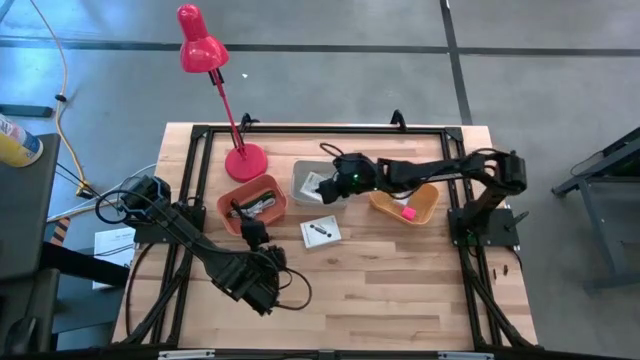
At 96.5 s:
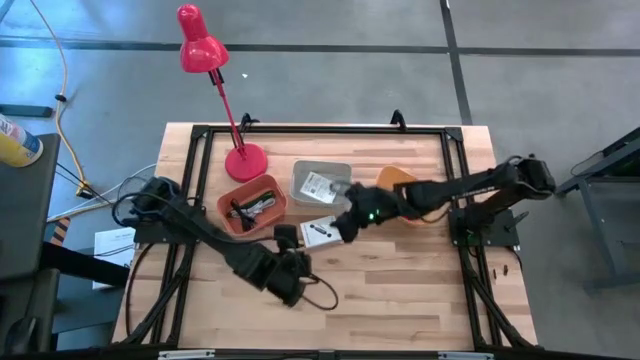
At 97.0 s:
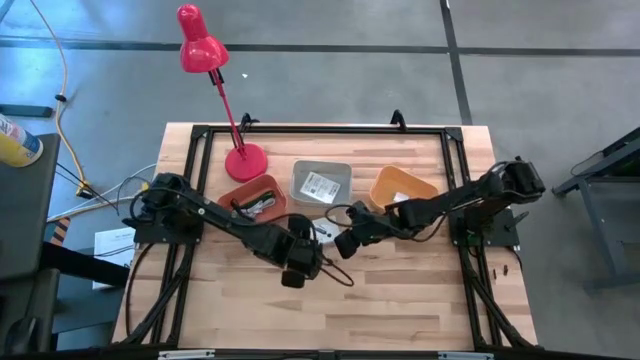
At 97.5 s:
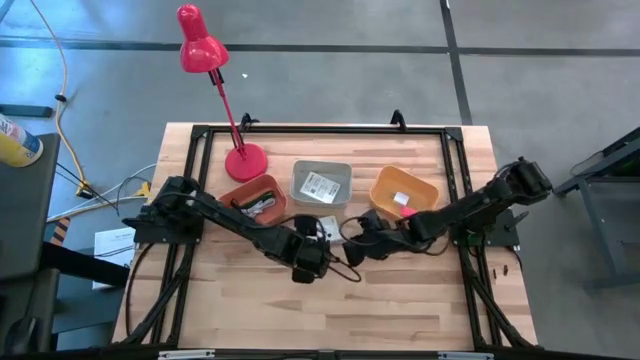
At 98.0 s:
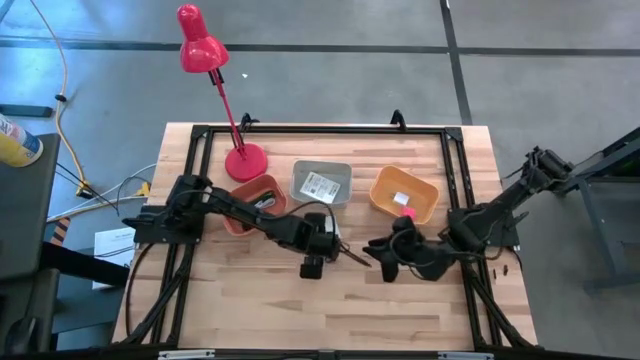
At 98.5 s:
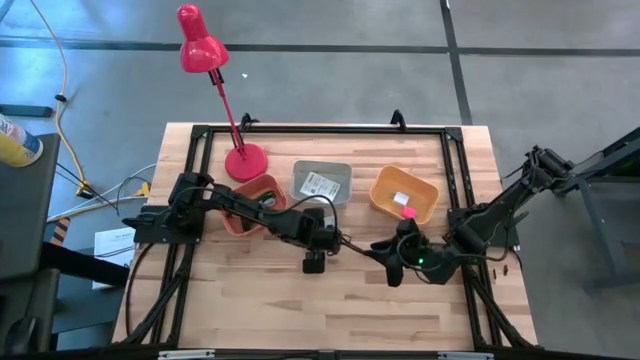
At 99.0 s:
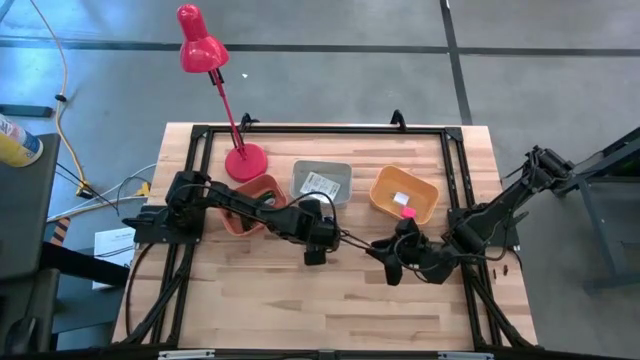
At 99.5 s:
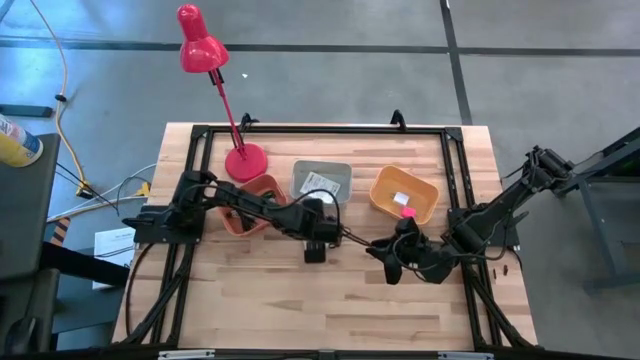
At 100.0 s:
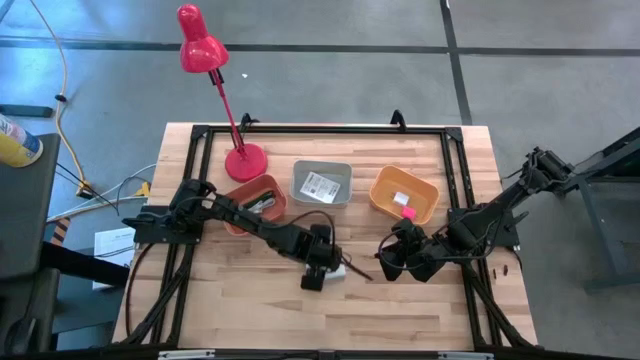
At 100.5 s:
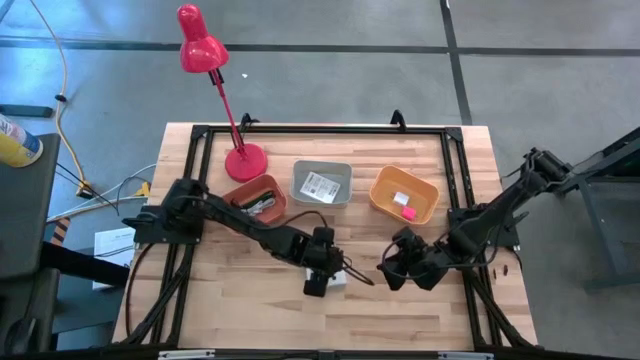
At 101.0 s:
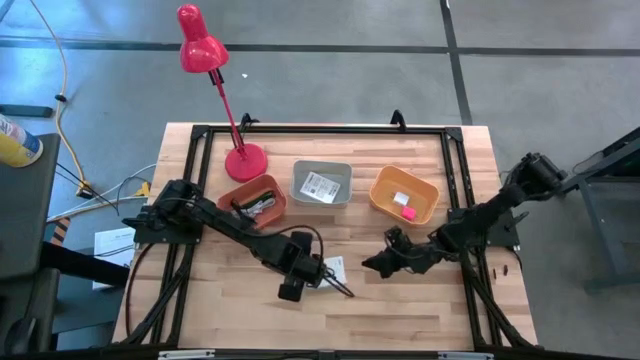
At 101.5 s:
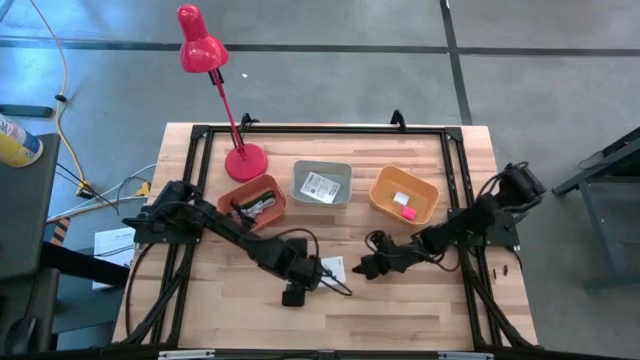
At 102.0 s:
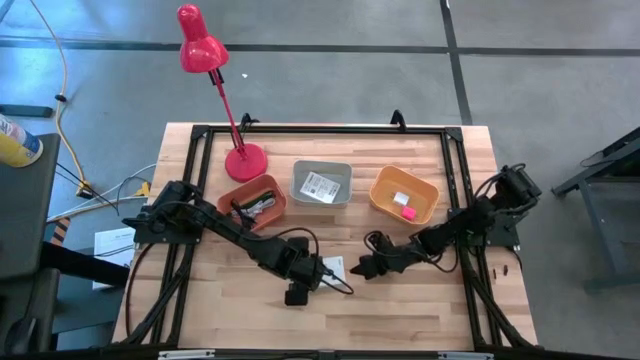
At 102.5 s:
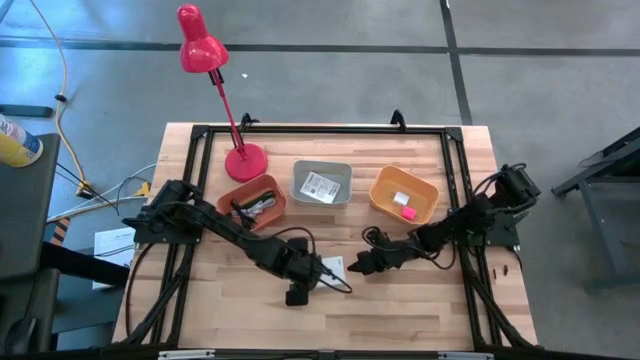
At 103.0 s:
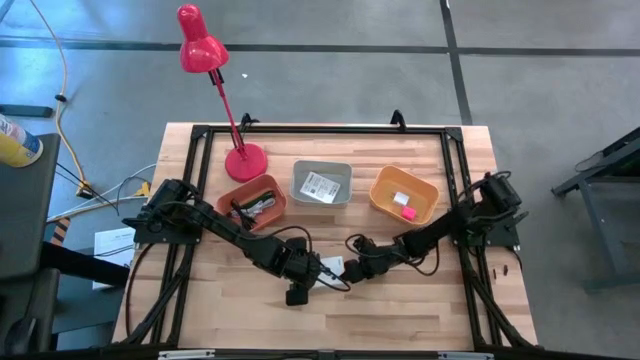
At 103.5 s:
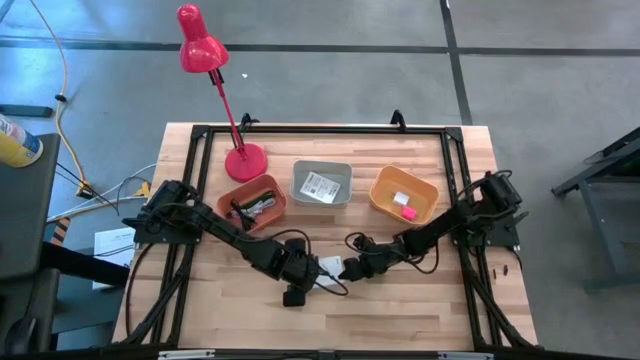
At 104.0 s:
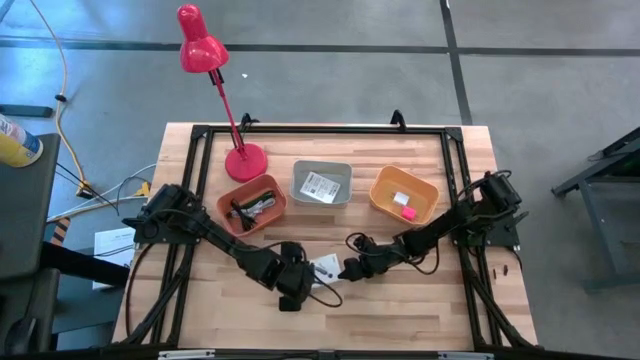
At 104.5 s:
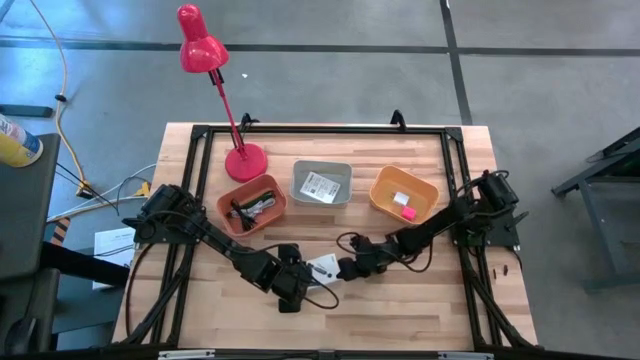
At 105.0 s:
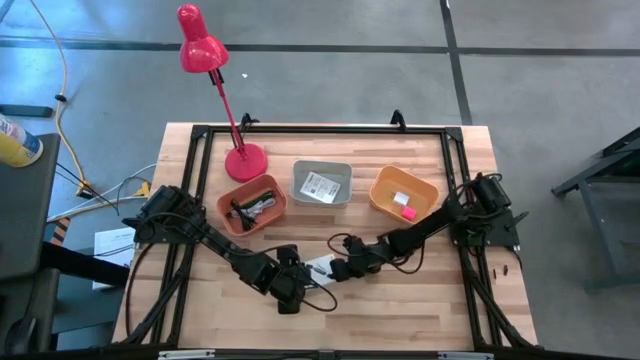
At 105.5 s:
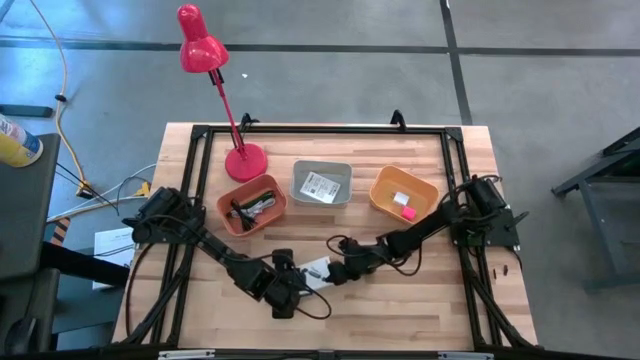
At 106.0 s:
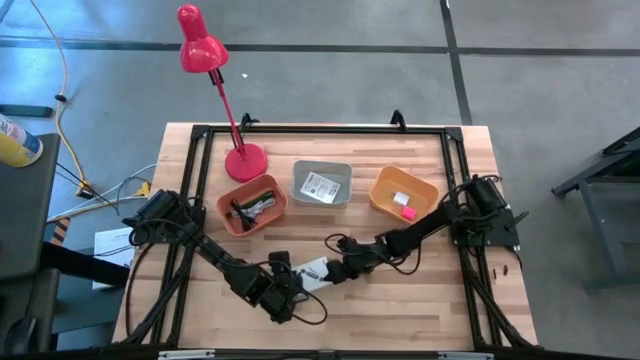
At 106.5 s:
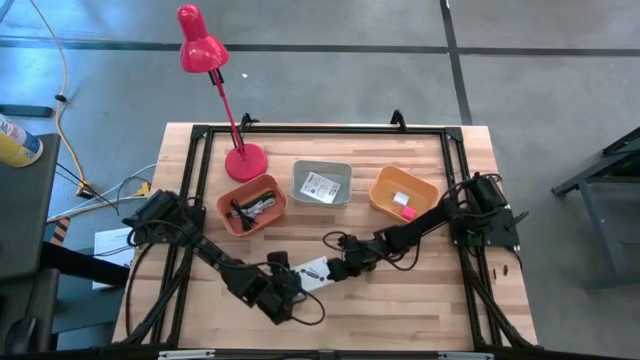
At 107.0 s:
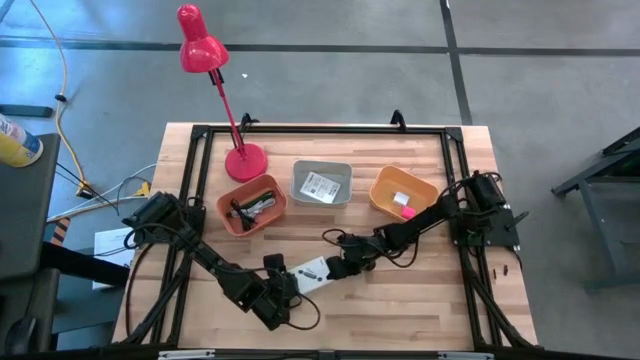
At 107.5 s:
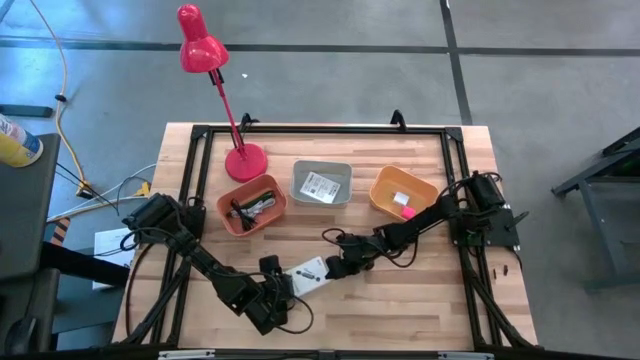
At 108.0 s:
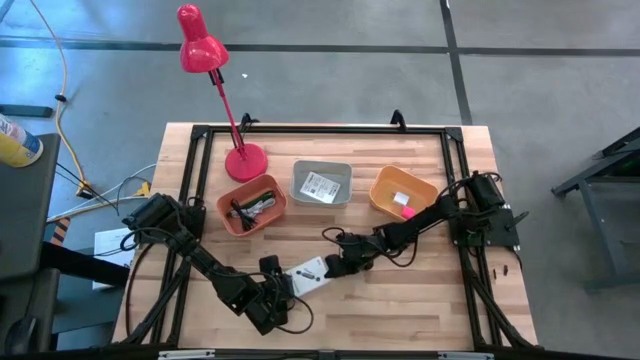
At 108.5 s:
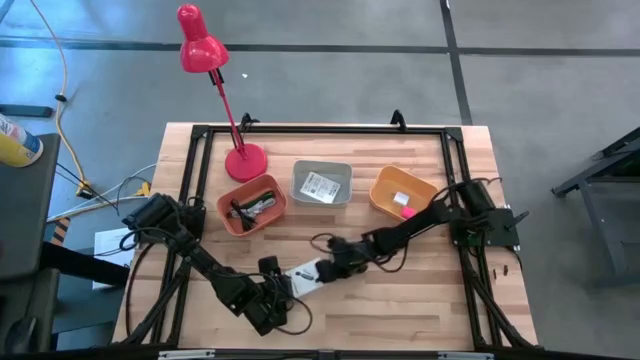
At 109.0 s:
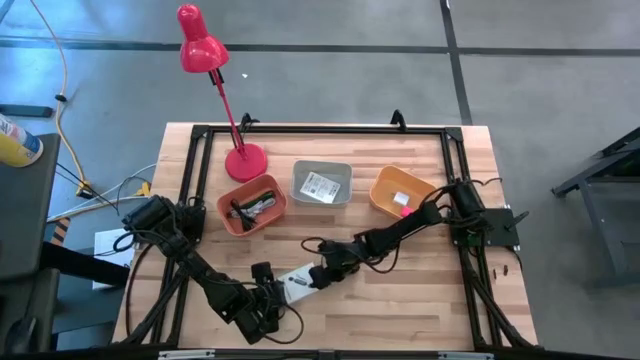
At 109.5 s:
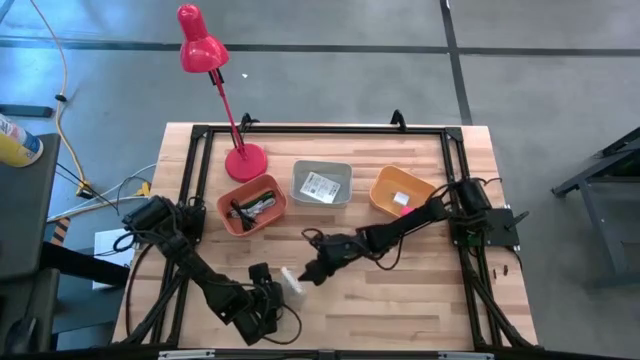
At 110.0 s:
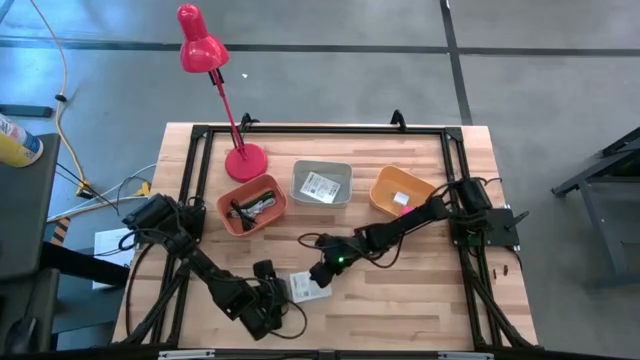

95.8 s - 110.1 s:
Task: Pick and place items into bin
Put the white card reader box into the gray bin

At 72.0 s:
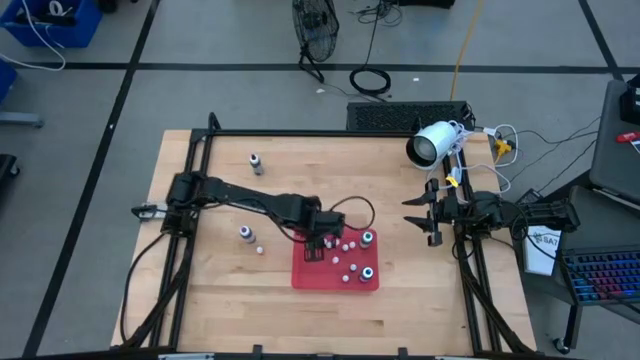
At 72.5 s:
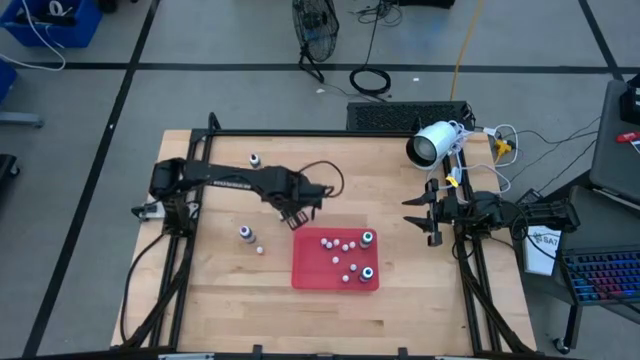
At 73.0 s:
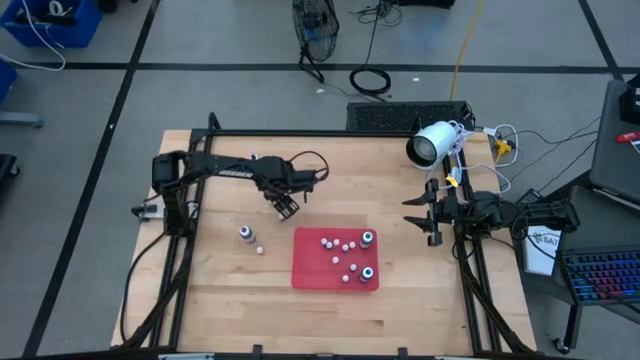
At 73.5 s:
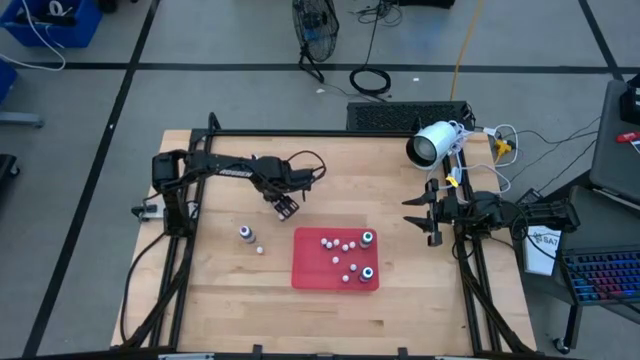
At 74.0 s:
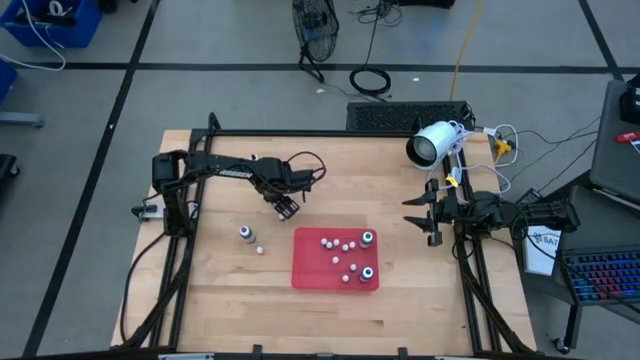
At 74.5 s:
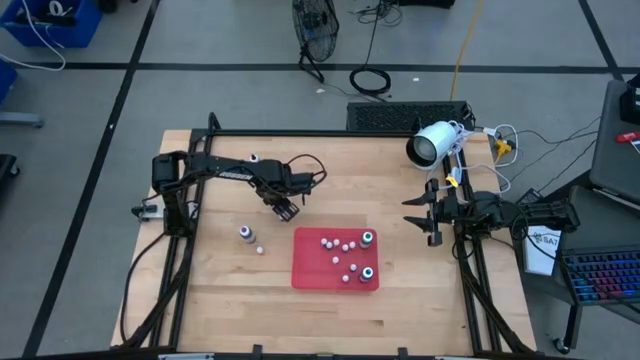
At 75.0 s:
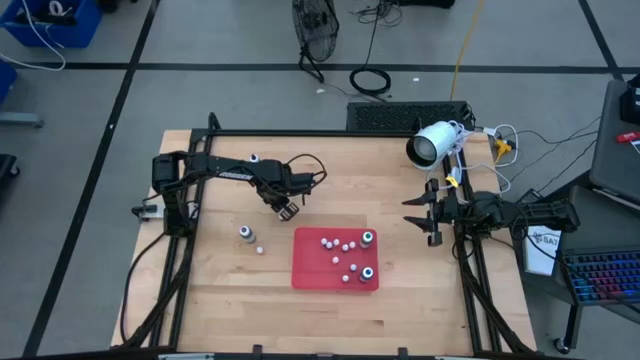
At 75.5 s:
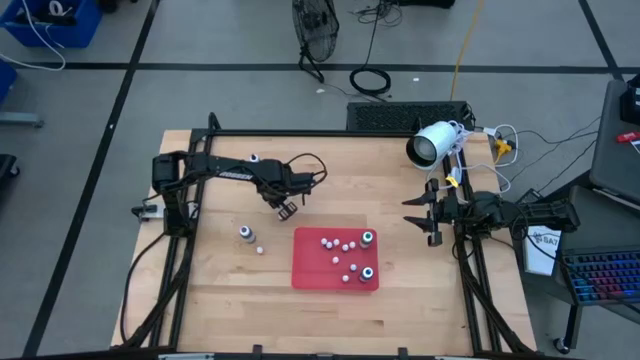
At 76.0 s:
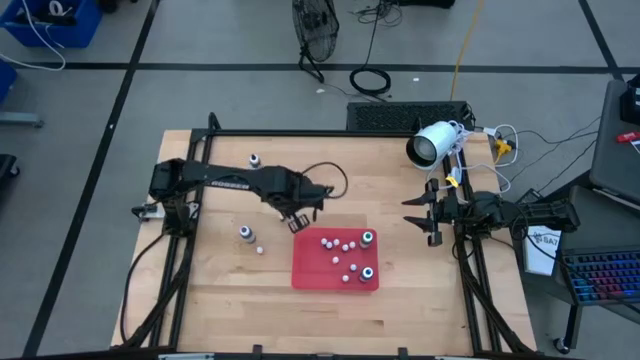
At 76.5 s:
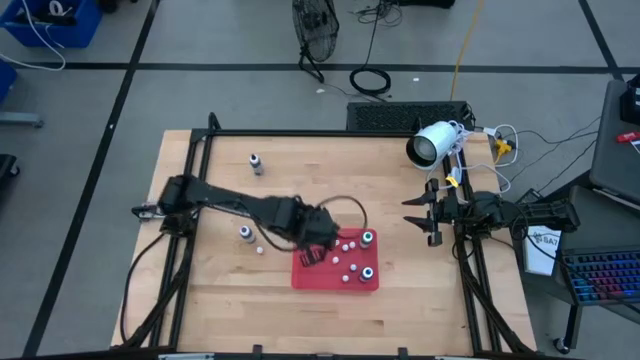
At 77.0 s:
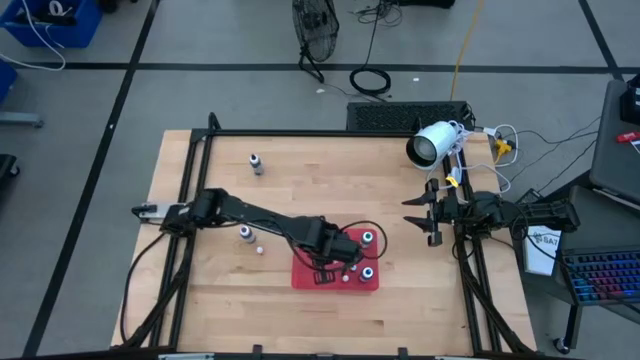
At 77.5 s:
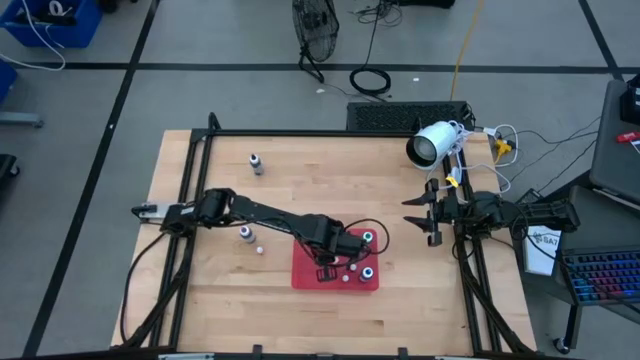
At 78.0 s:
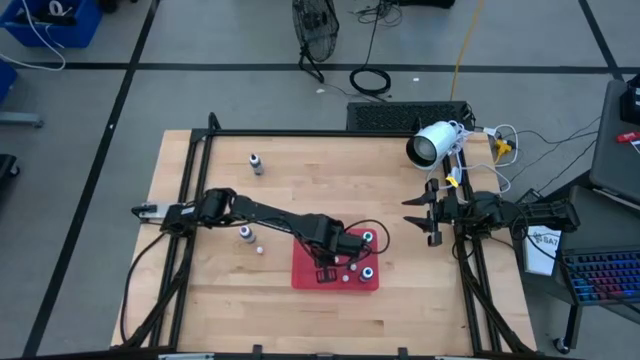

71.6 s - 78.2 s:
Task: Pick & Place food coloring
Put the small black food coloring bottle into the red bin
